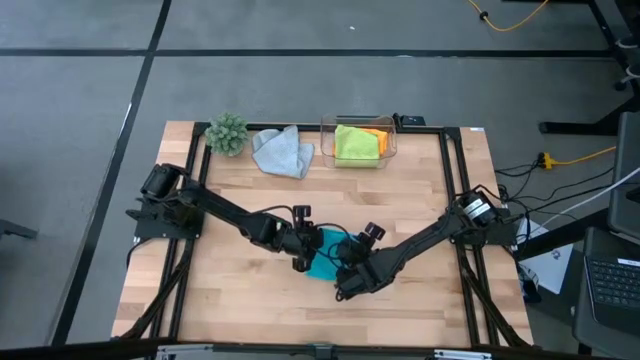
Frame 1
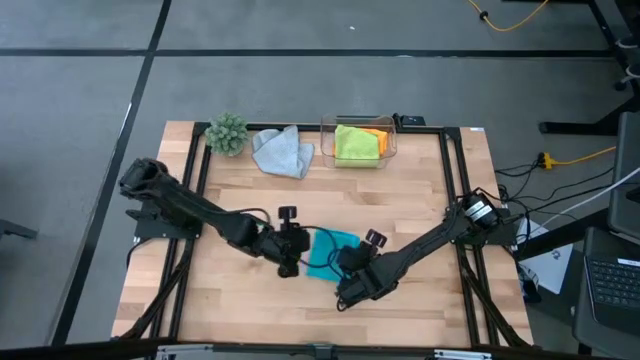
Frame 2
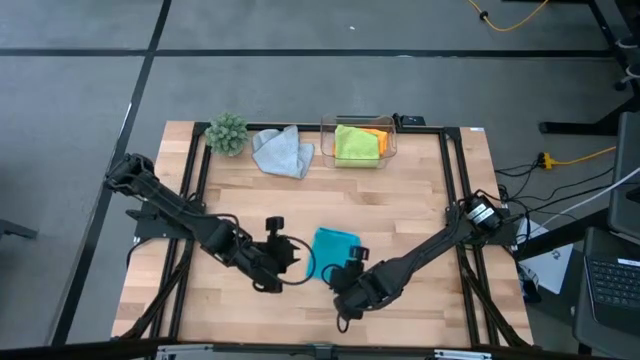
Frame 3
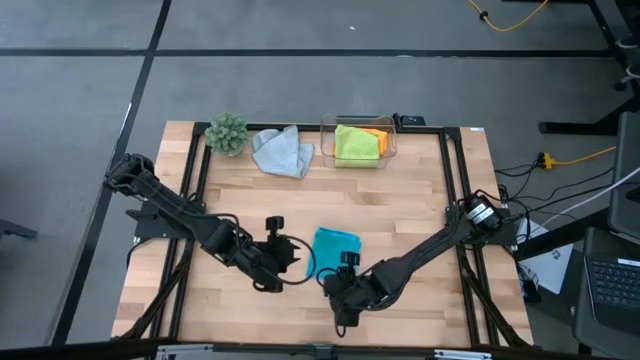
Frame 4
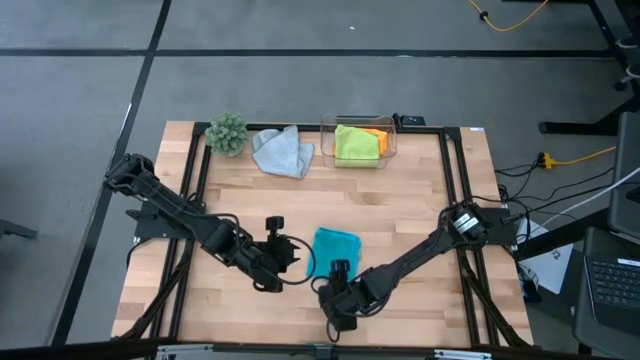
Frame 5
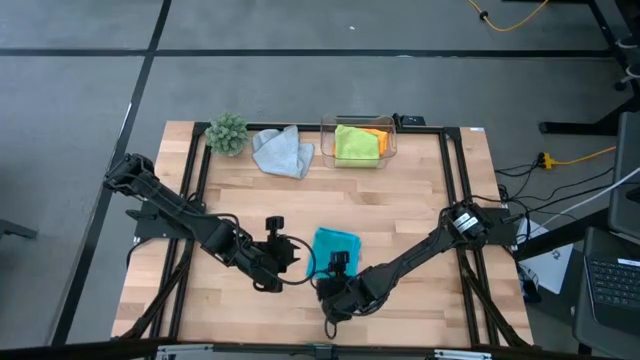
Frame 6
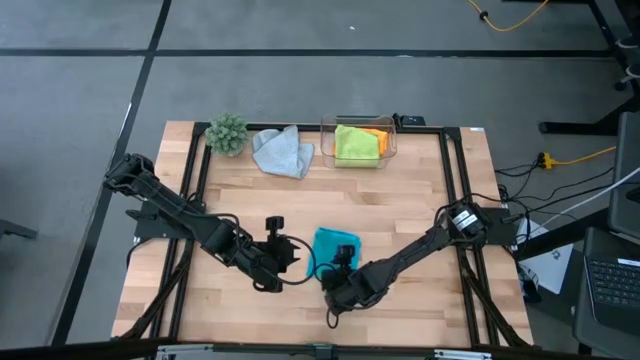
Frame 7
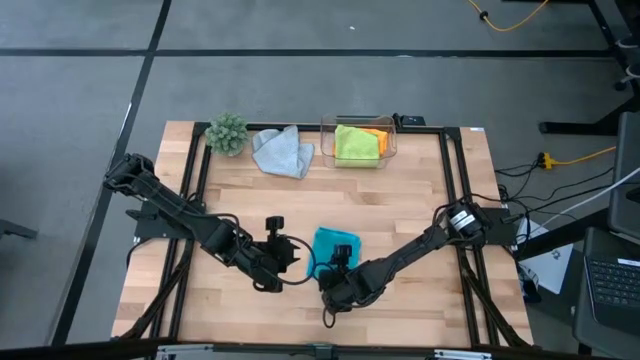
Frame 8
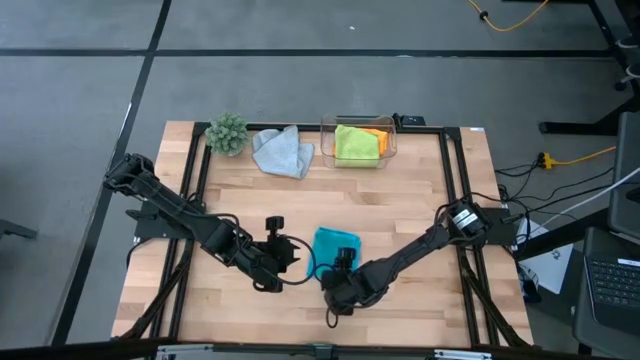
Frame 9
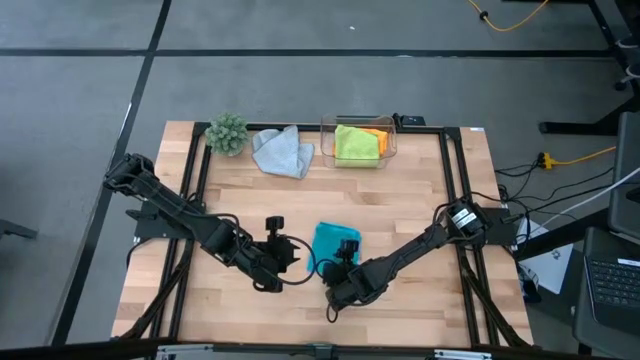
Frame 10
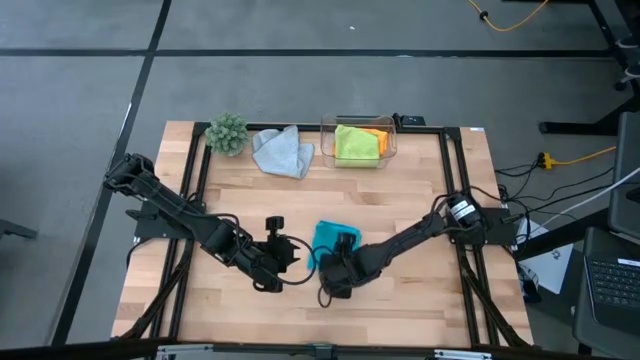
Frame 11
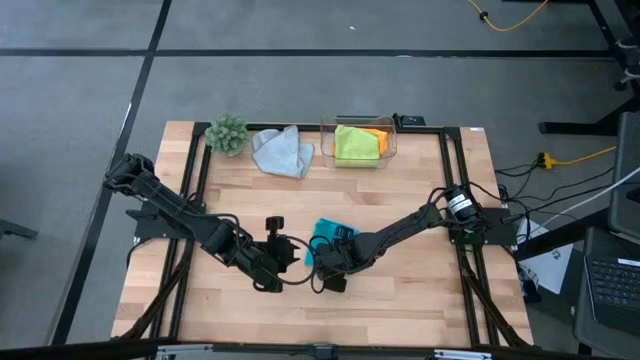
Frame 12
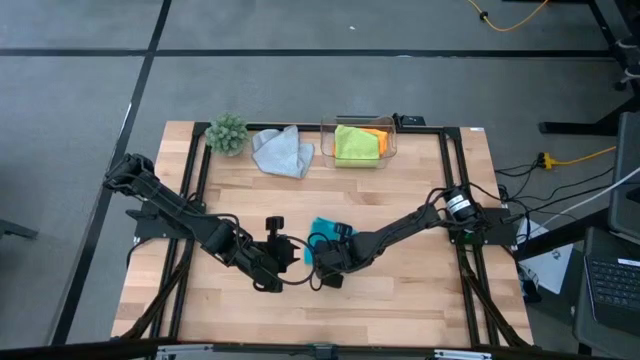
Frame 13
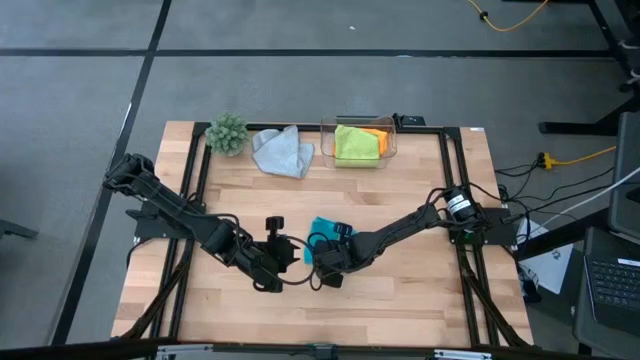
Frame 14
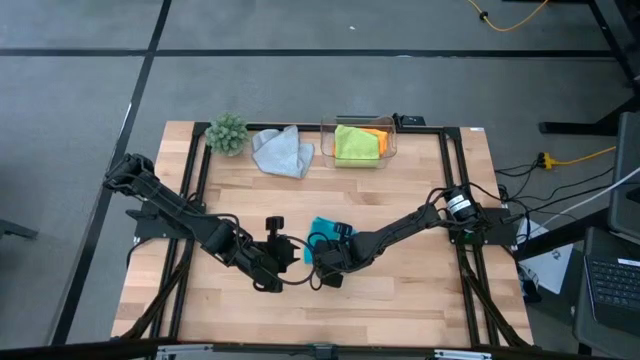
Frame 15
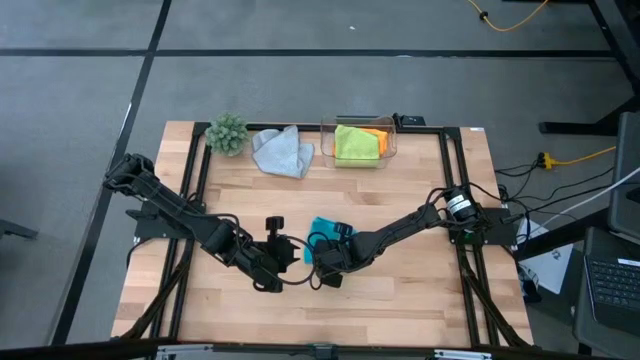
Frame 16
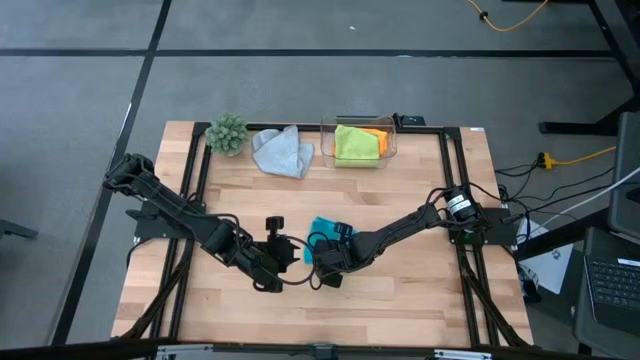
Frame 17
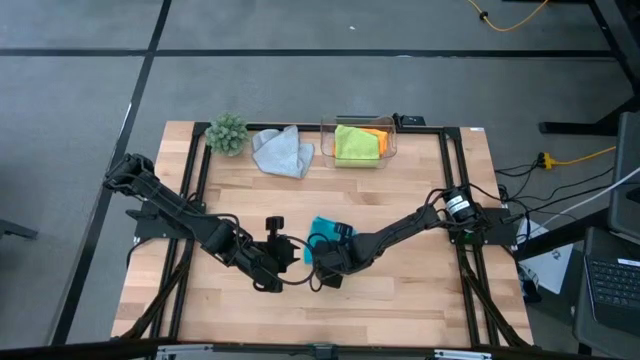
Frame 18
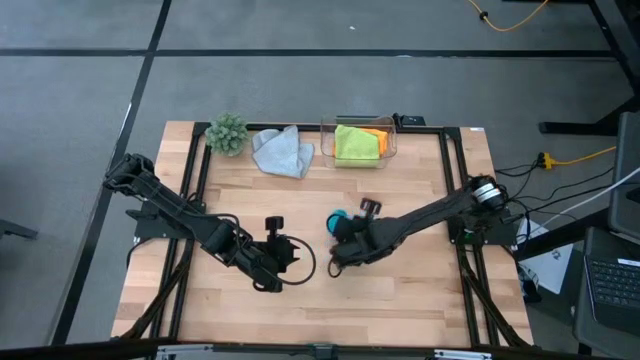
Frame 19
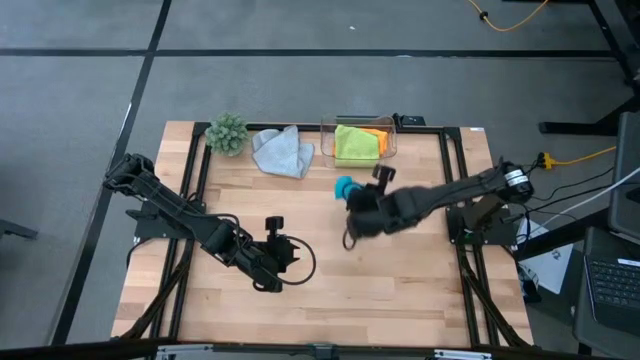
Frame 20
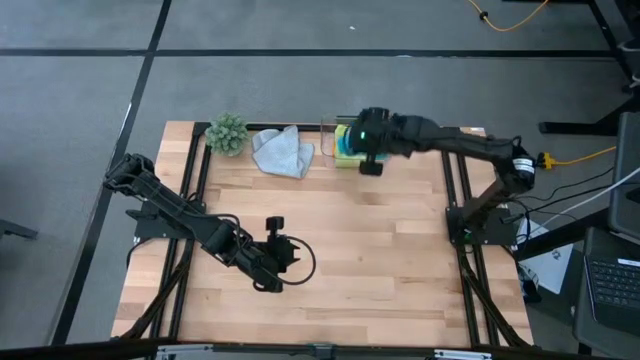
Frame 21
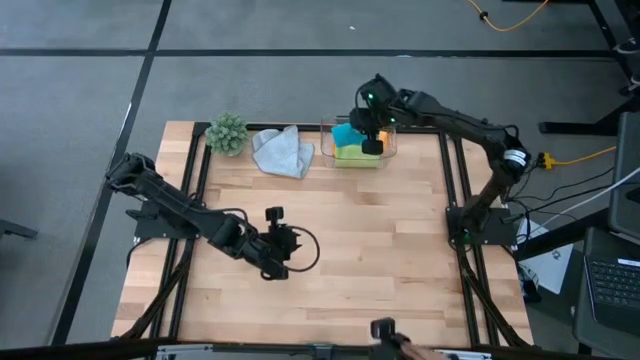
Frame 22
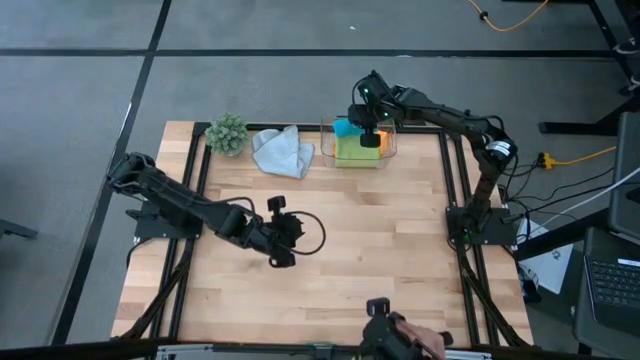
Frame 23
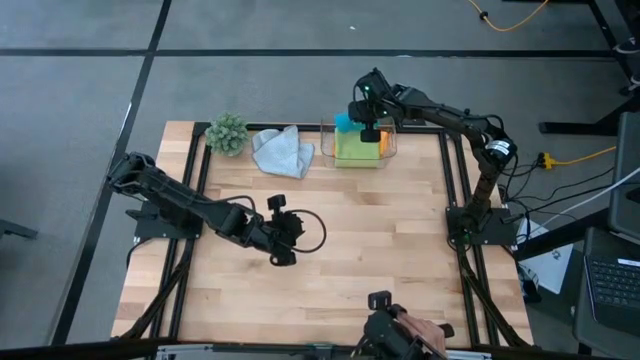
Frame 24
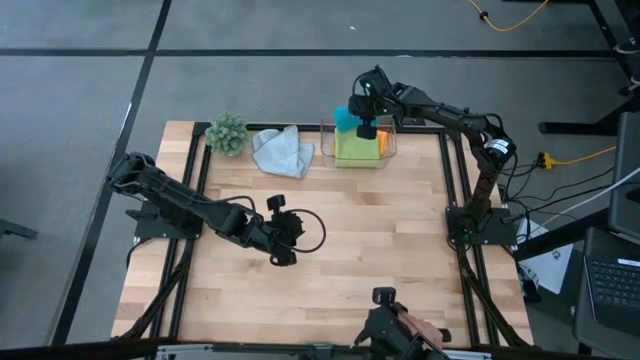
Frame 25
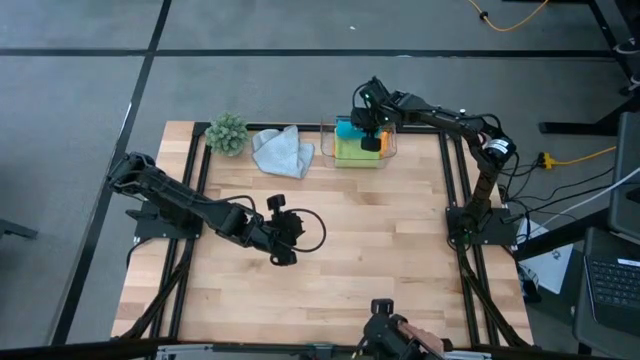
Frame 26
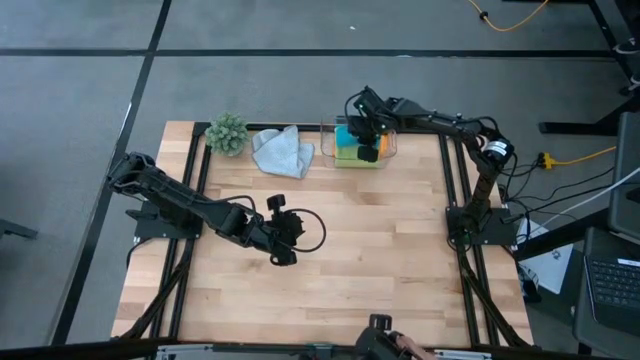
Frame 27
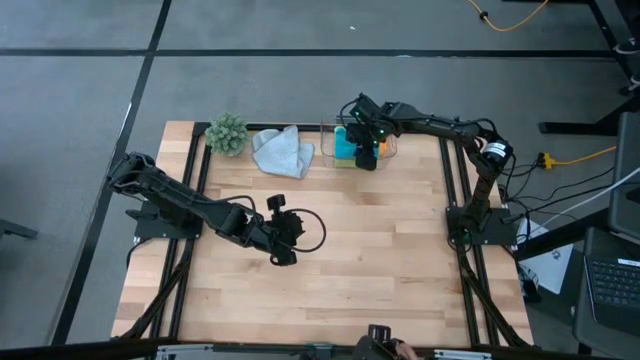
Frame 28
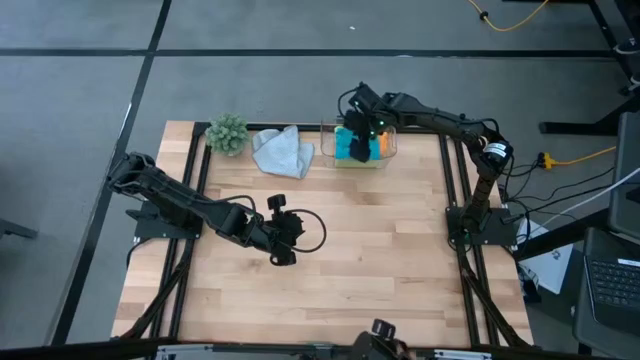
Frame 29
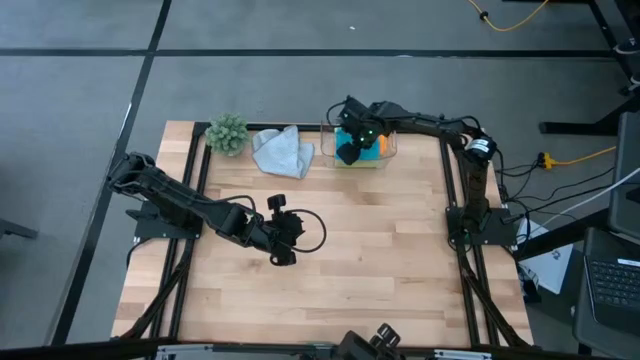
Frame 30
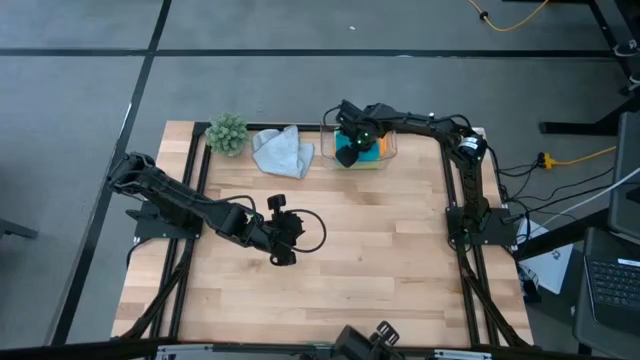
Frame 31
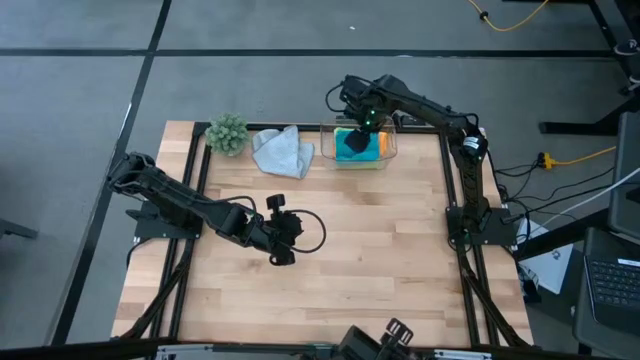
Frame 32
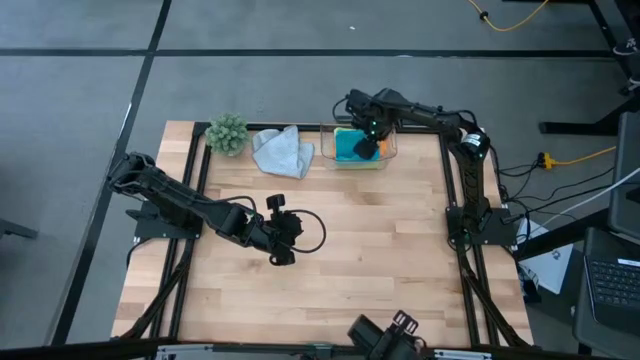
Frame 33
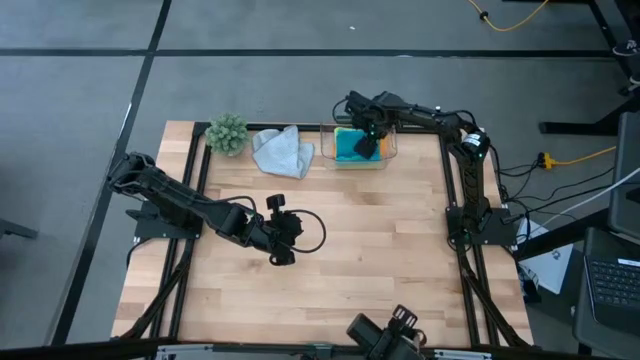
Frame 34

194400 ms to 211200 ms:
Task: Fold microfiber towels
Put the blue microfiber cloth into the transparent bin

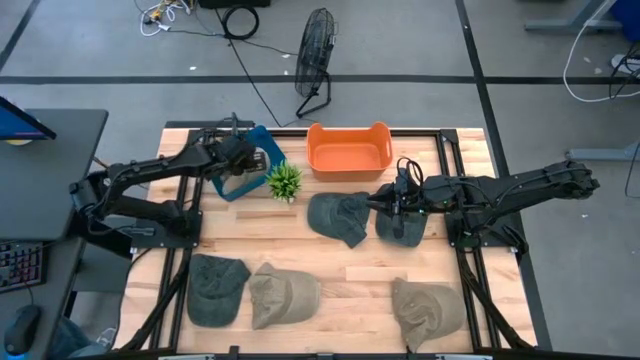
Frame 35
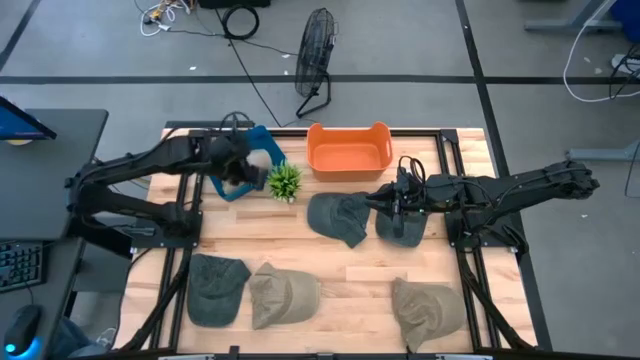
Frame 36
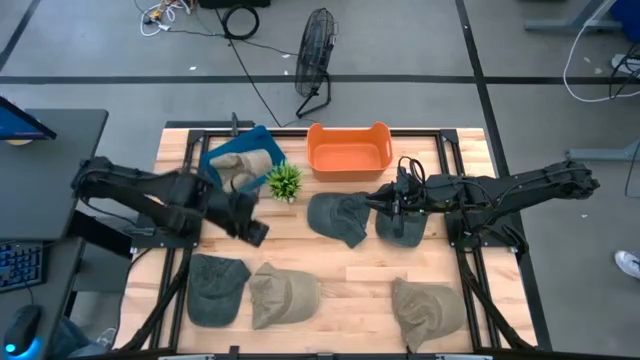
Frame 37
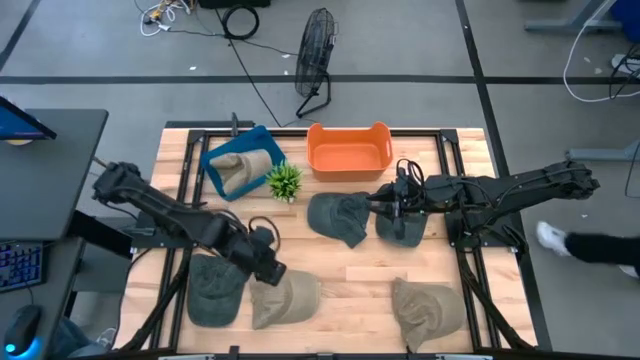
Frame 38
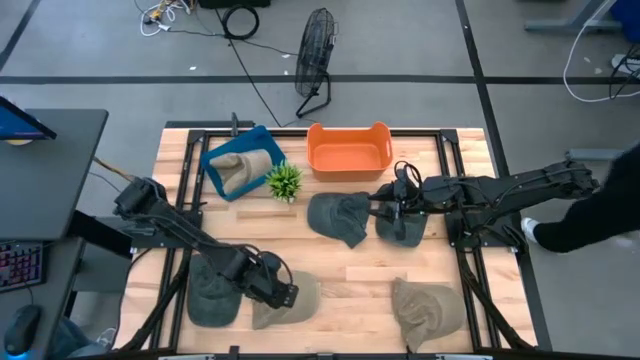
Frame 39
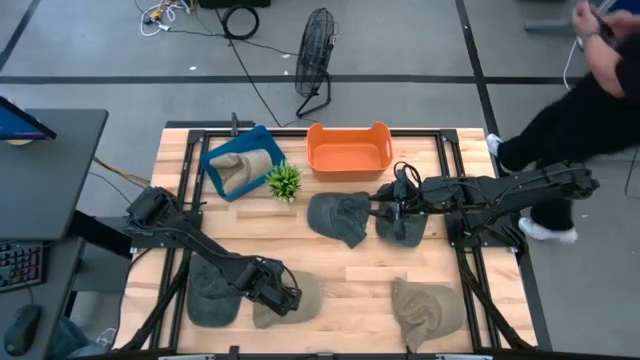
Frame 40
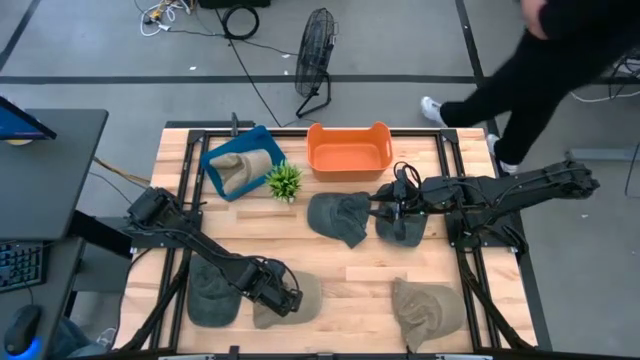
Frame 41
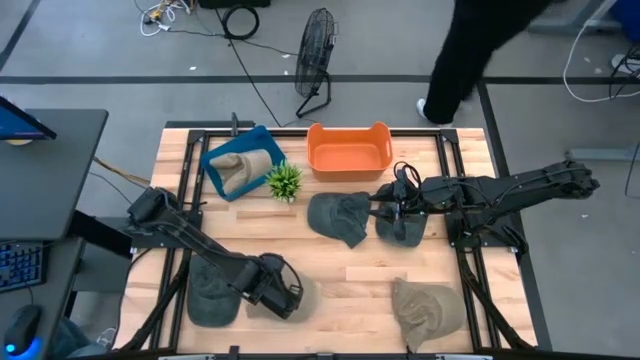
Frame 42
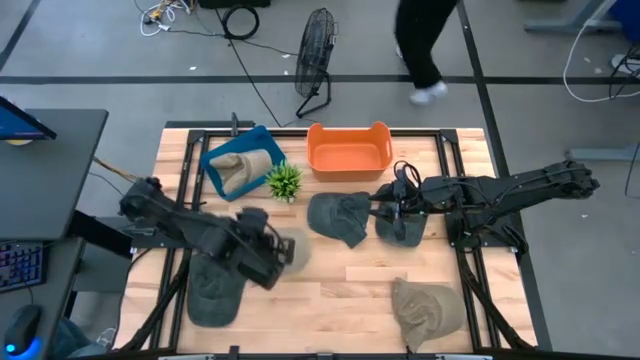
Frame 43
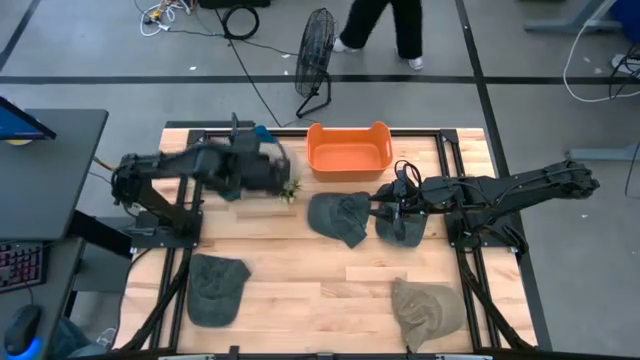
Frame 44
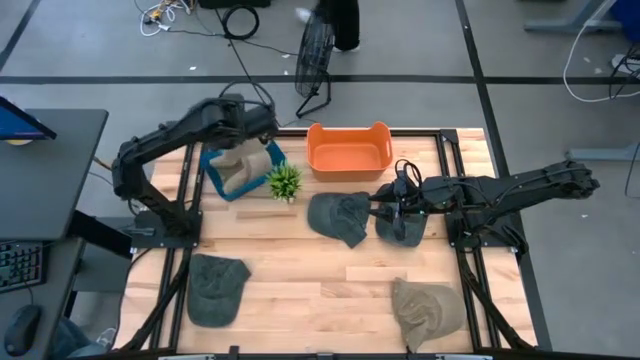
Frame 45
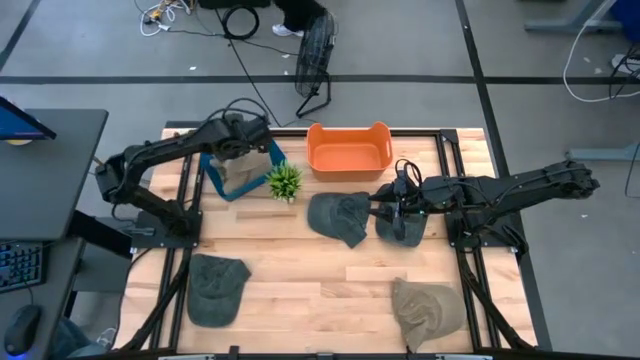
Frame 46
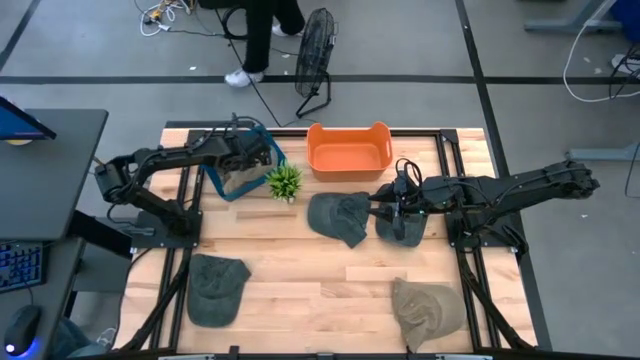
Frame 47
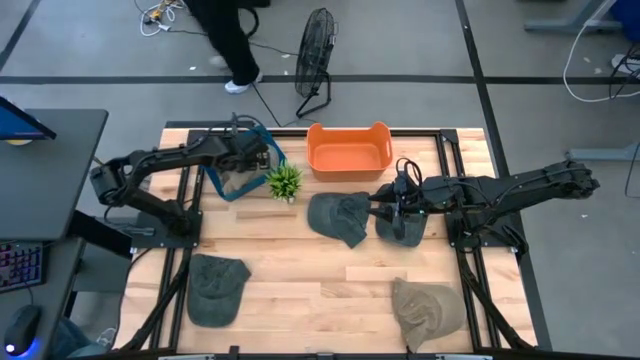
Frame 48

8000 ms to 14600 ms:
Task: Pick & Place hat
Put the left brown cap into the blue bin
